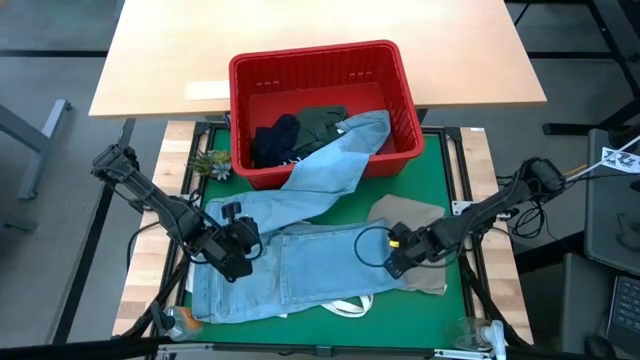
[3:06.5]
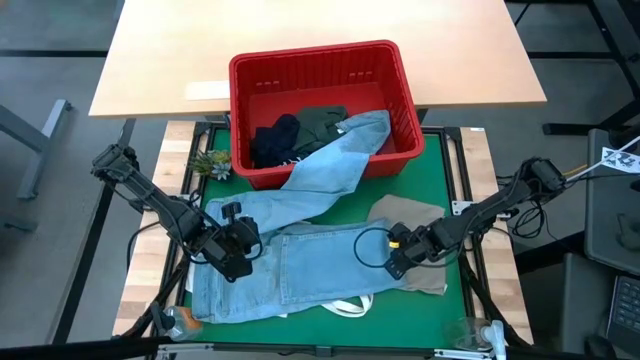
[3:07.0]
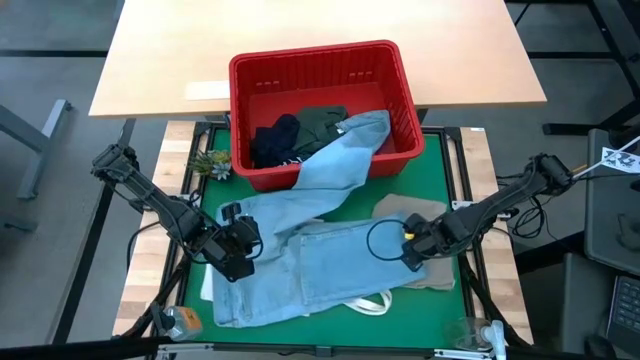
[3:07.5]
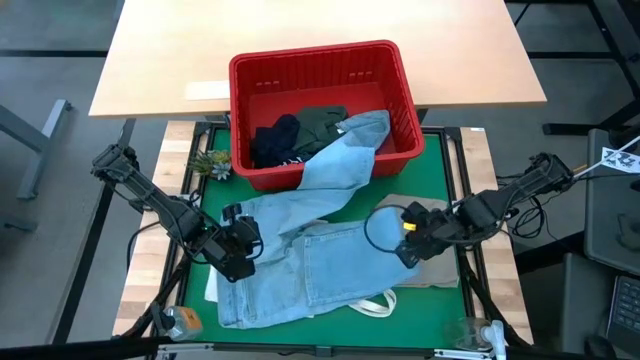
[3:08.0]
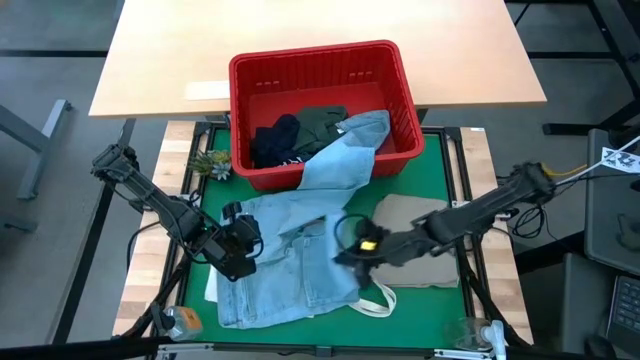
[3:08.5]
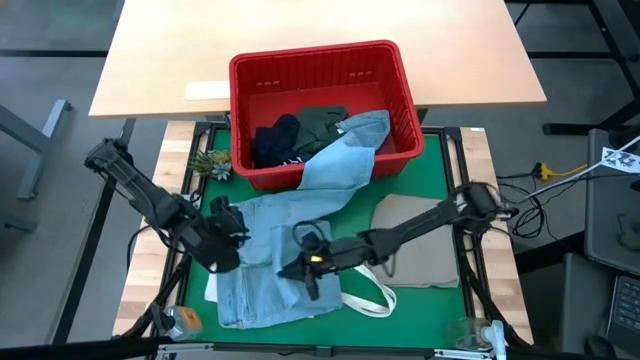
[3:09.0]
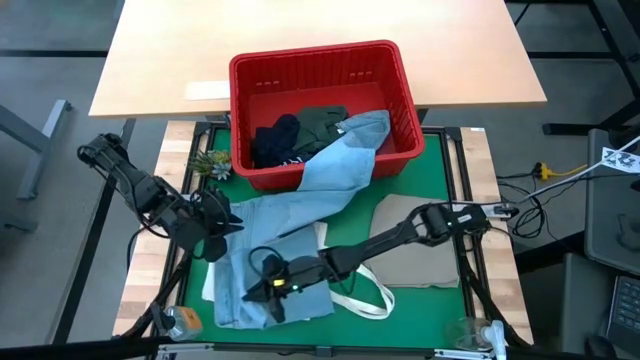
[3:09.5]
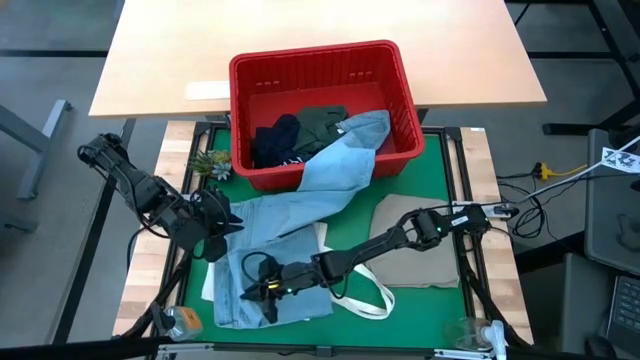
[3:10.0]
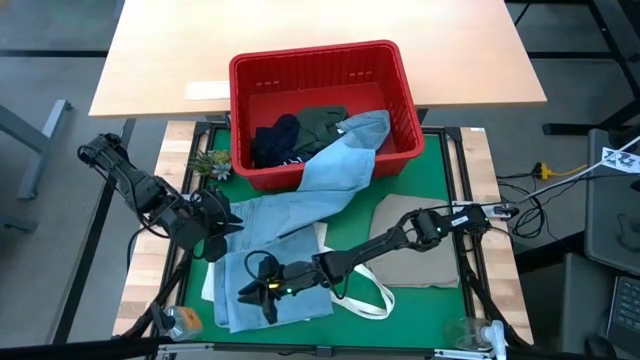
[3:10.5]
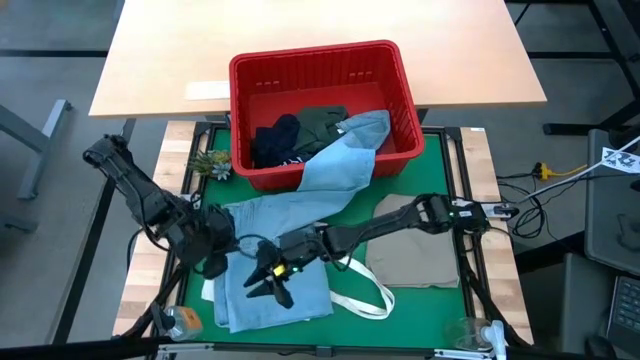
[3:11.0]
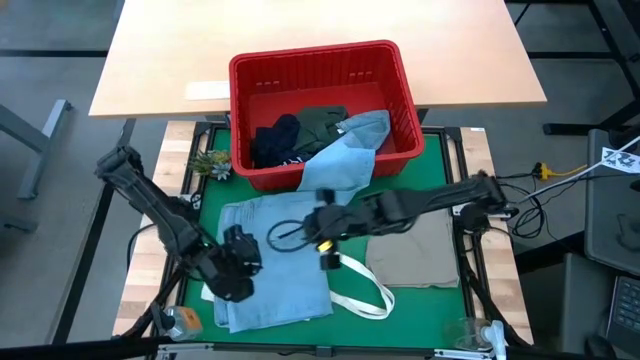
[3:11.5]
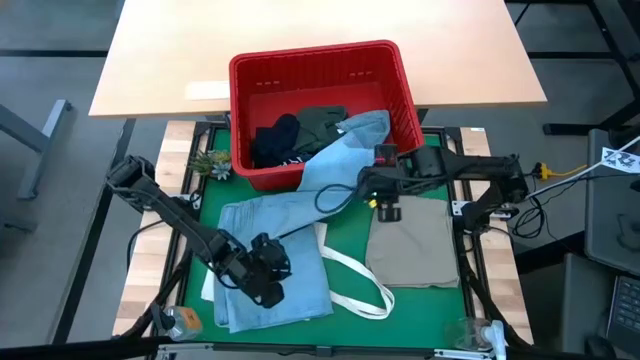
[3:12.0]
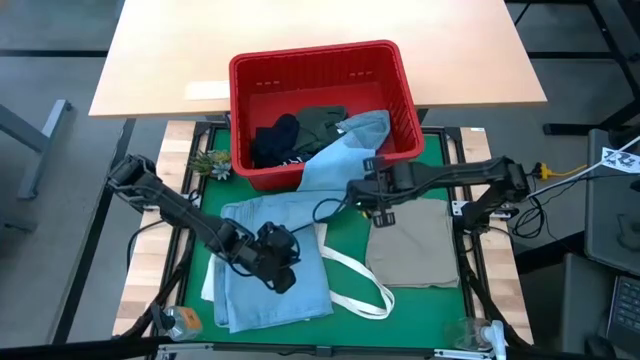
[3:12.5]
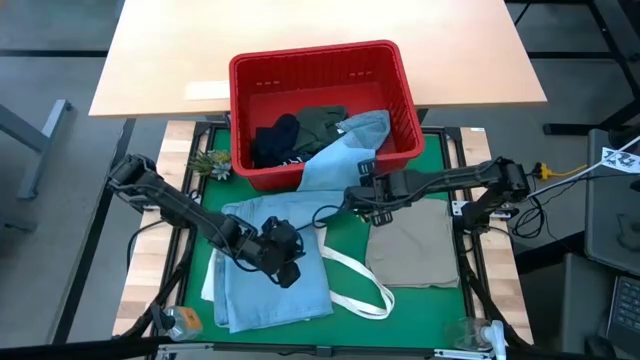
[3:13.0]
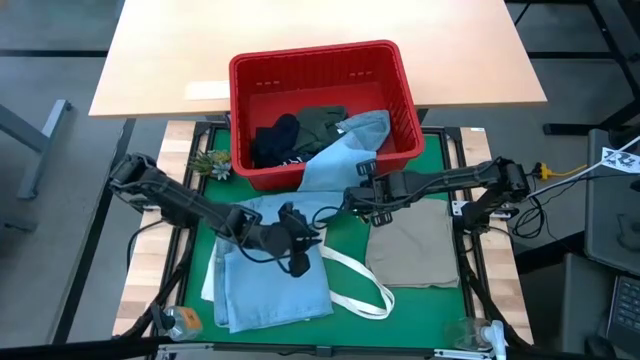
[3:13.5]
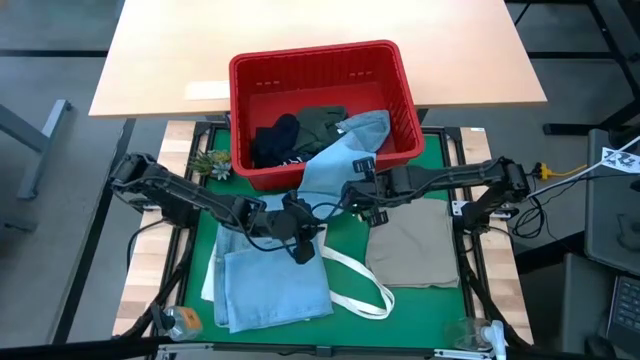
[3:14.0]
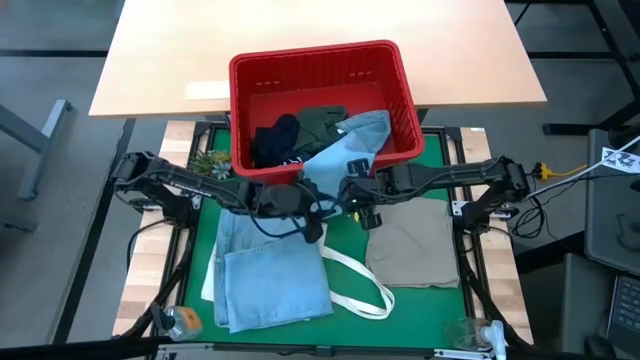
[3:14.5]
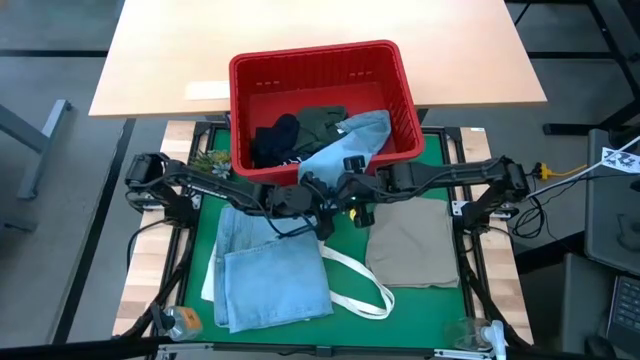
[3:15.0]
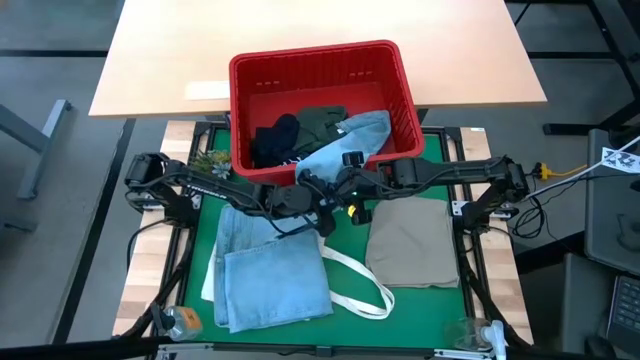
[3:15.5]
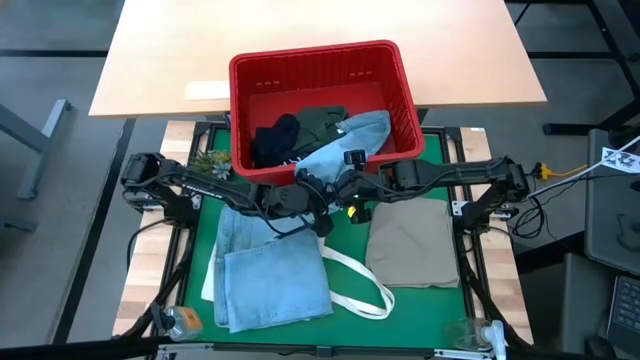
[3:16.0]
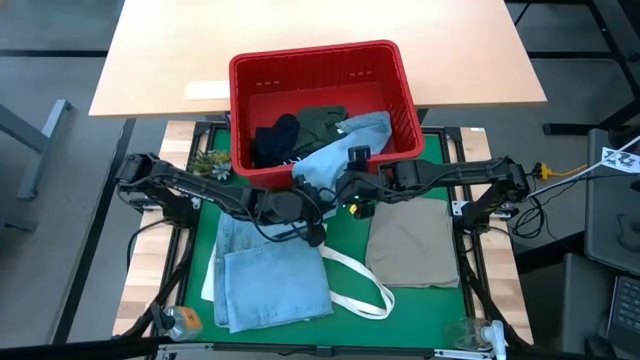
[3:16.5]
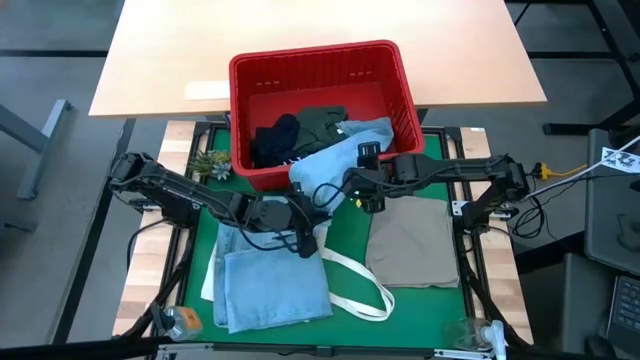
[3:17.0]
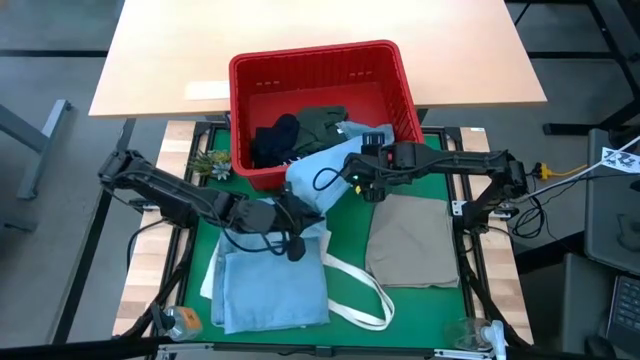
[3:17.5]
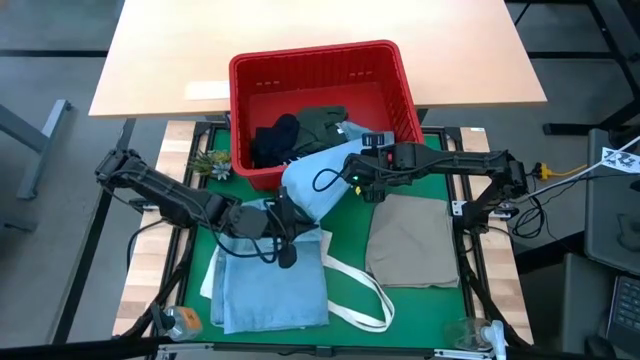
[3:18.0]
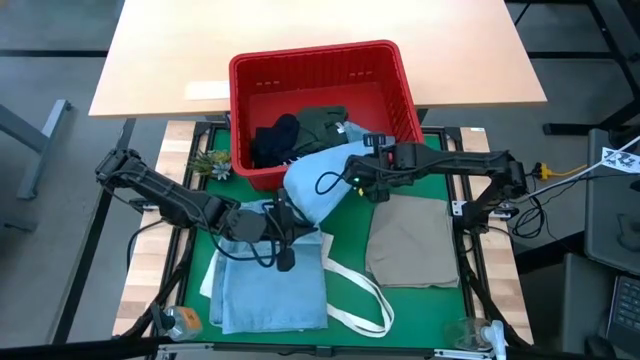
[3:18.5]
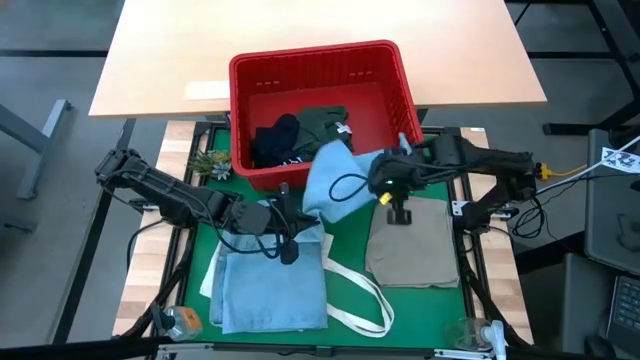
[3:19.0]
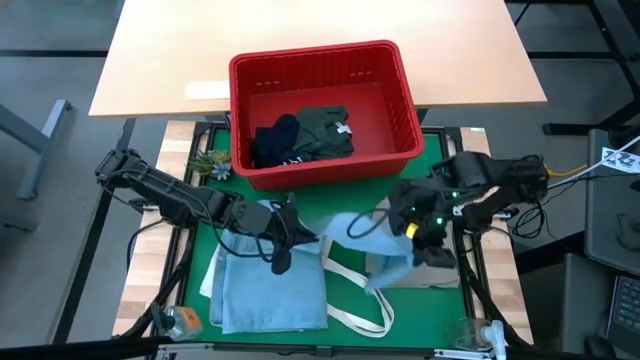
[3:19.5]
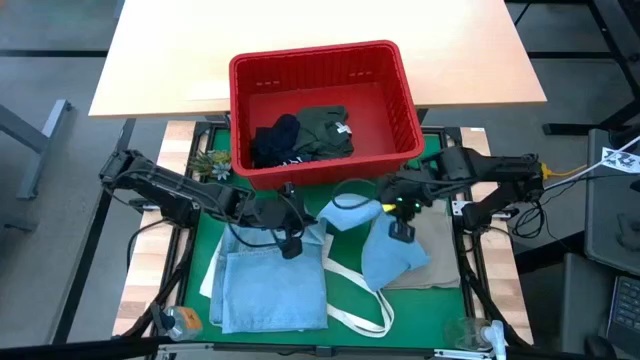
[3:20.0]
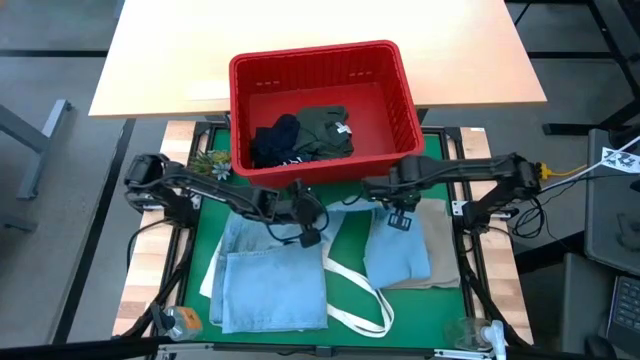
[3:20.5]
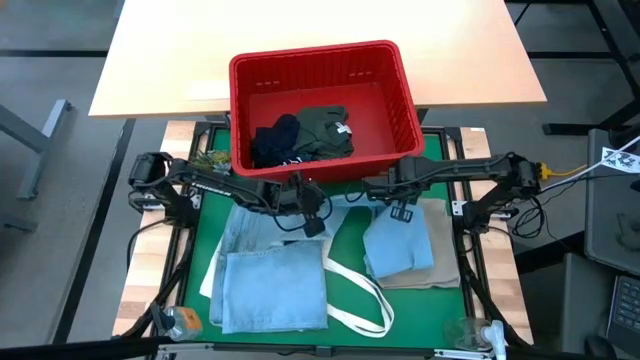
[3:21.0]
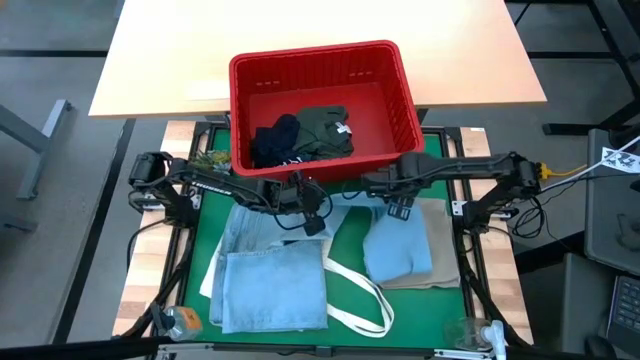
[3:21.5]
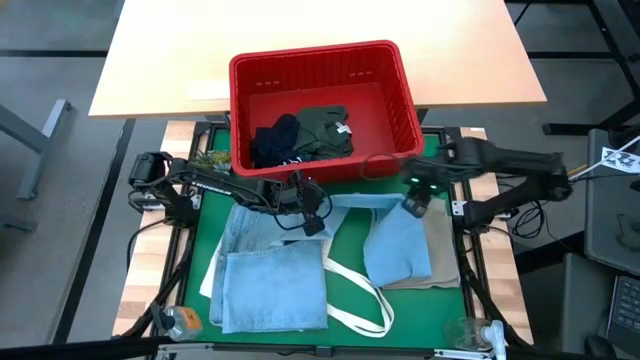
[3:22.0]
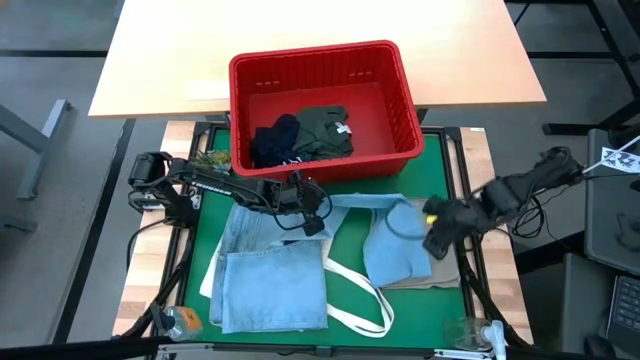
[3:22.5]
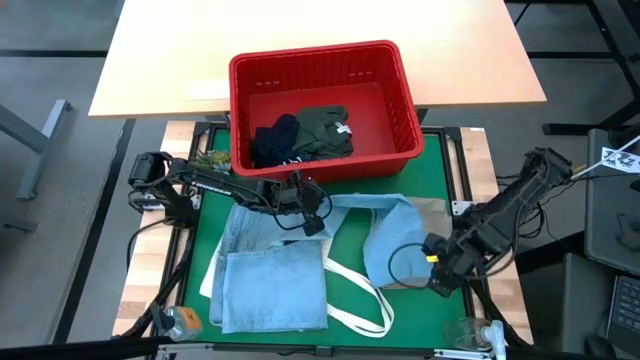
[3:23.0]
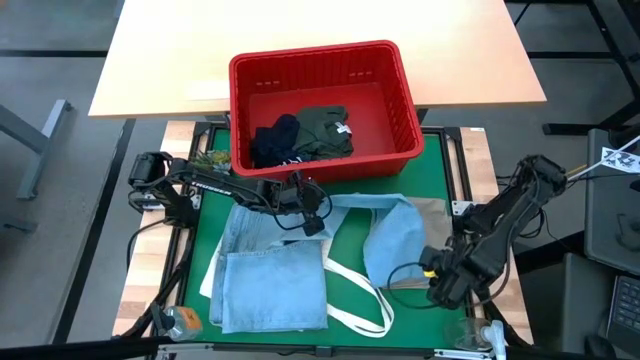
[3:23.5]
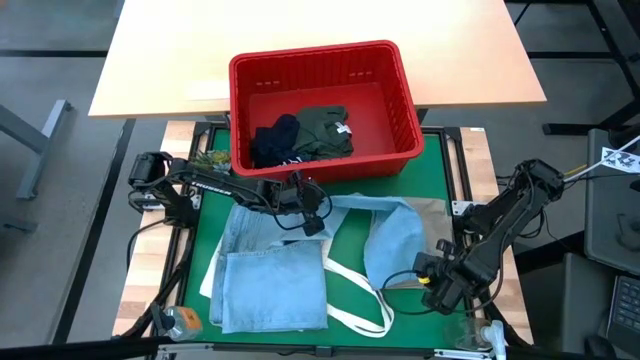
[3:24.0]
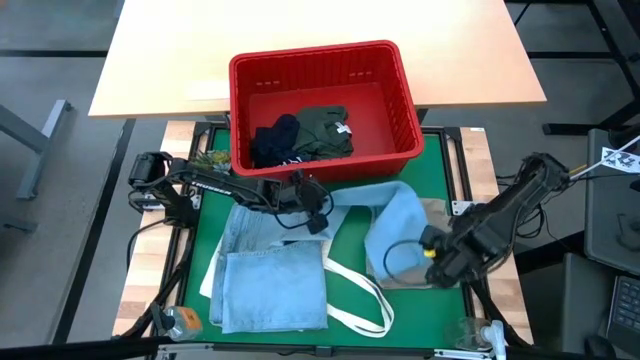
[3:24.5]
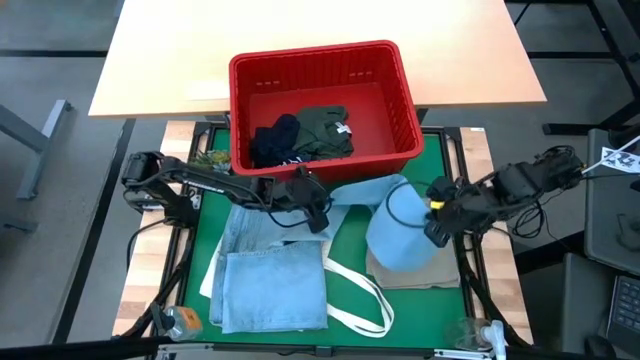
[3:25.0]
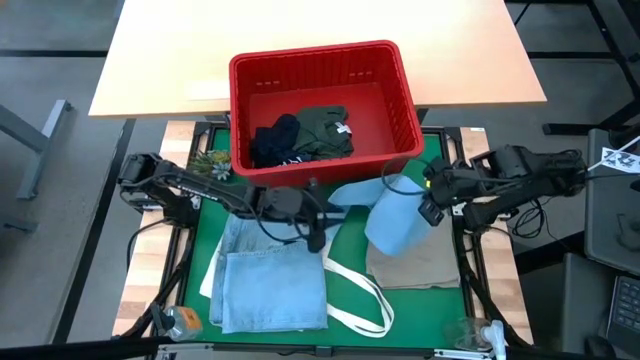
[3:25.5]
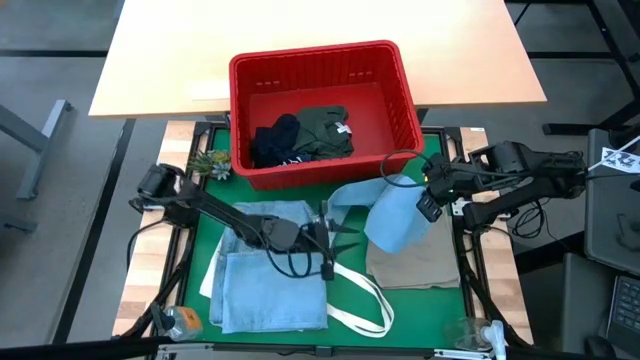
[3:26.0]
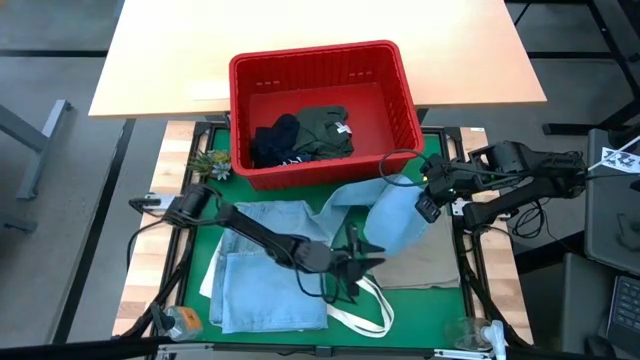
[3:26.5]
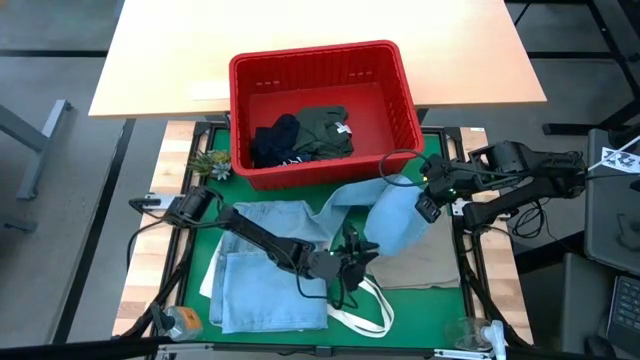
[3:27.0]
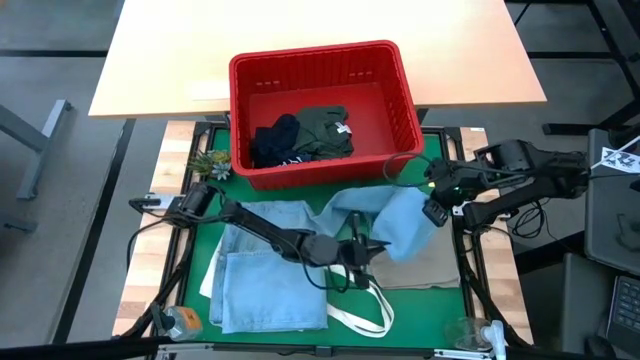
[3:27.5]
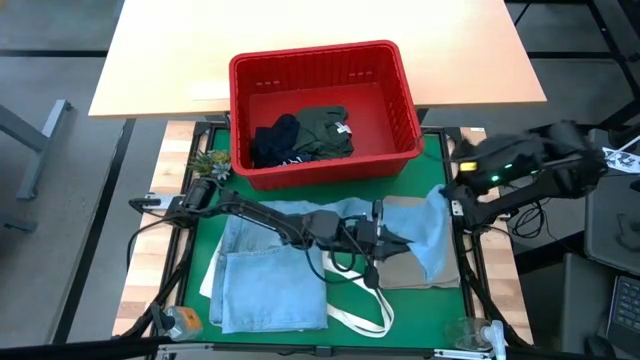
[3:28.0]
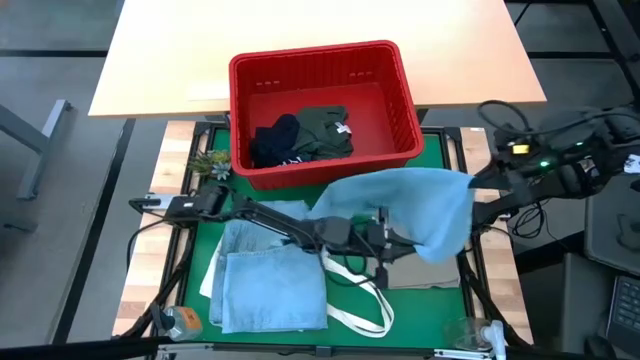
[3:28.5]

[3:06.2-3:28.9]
Task: Fold Laundry from Bin
Fold the light blue pants
